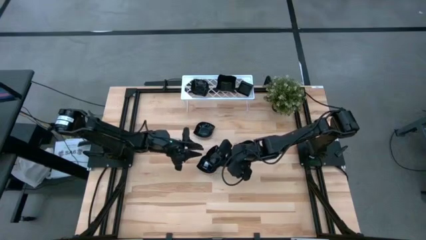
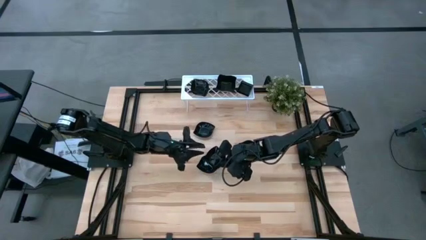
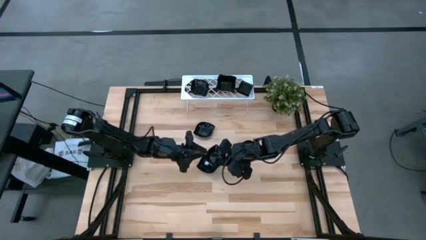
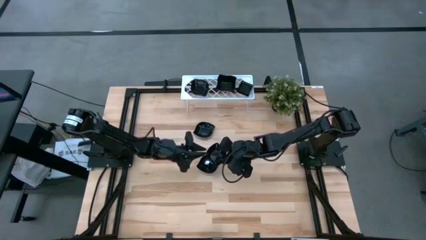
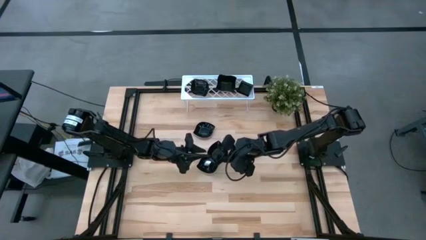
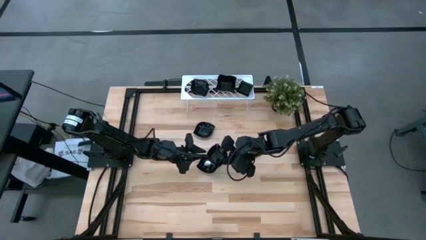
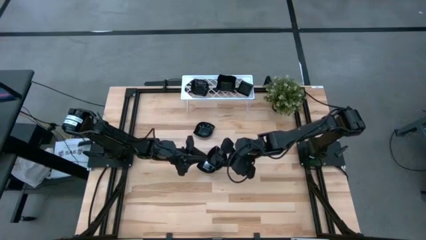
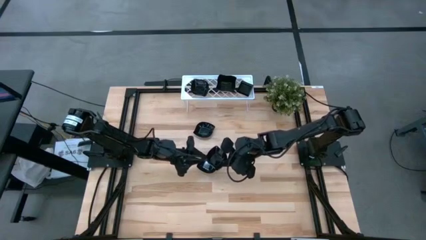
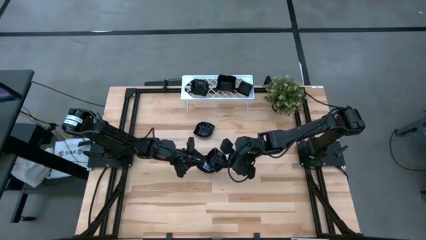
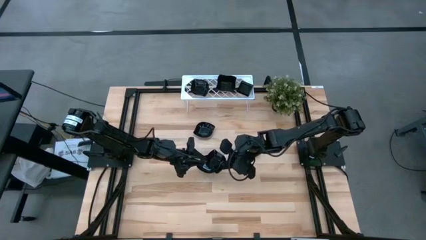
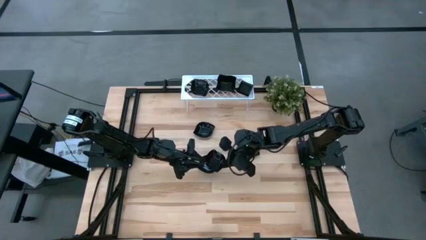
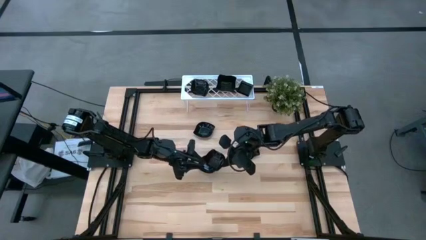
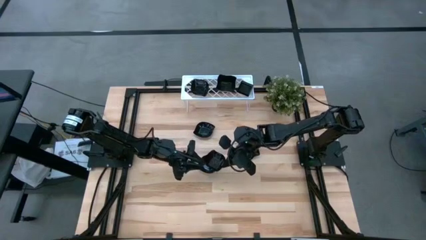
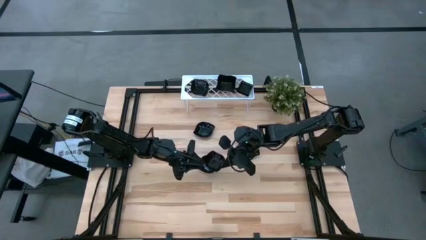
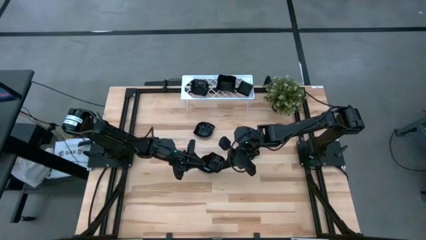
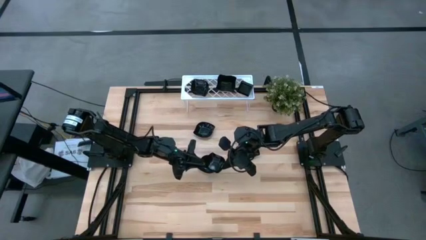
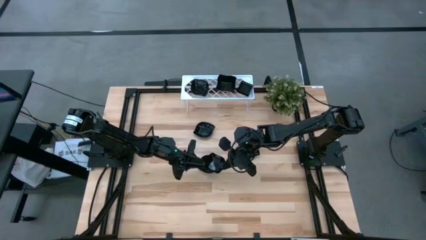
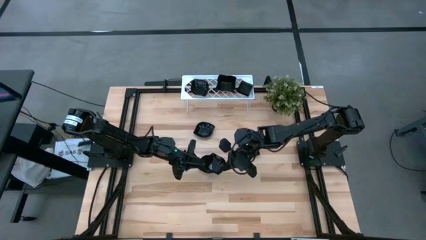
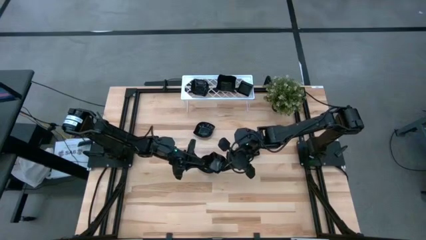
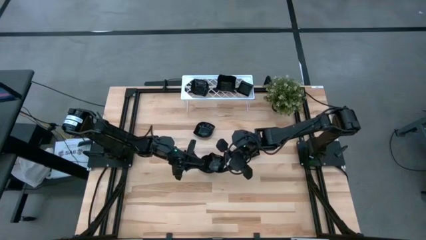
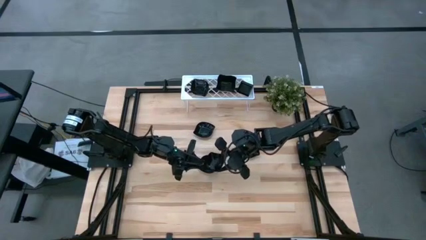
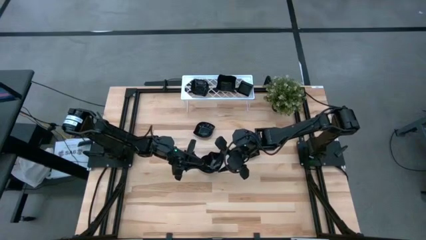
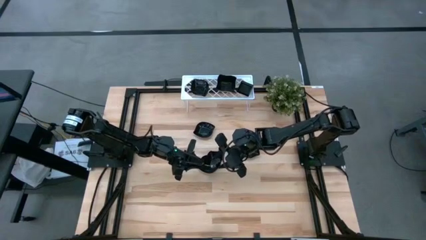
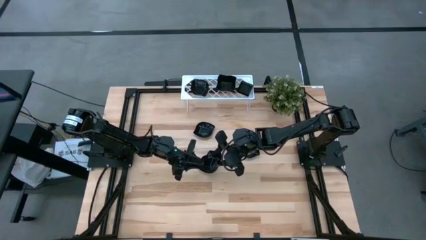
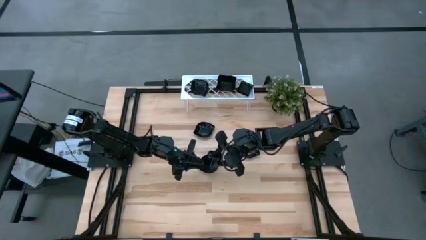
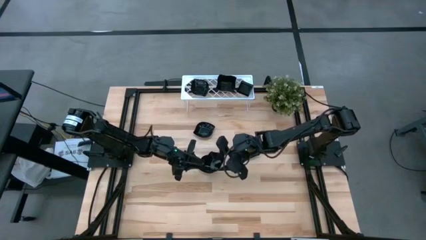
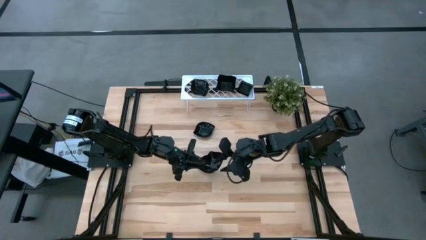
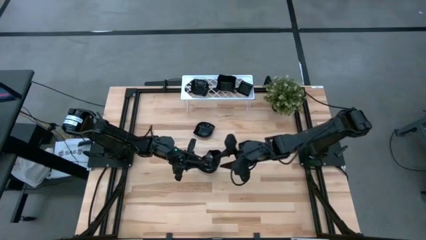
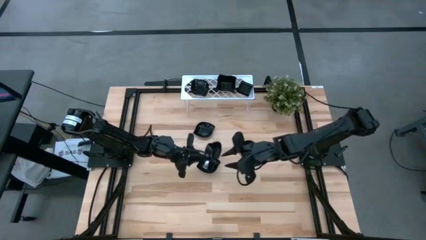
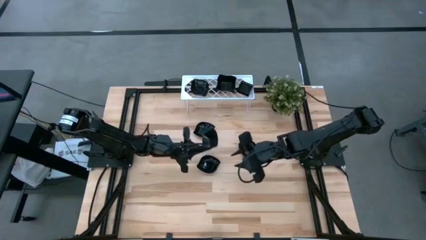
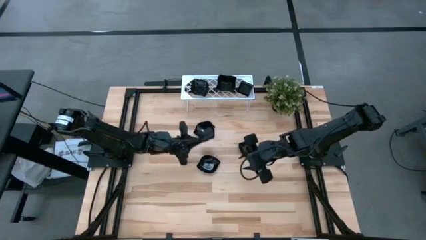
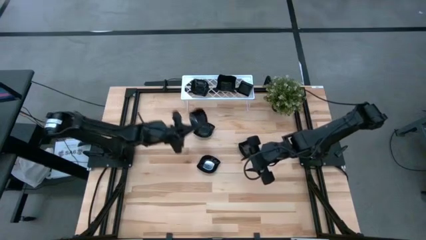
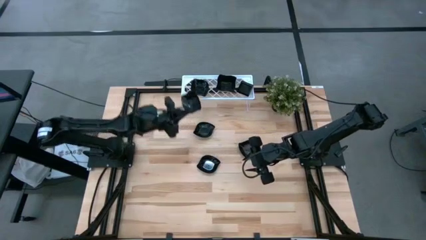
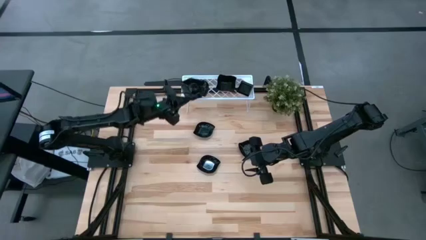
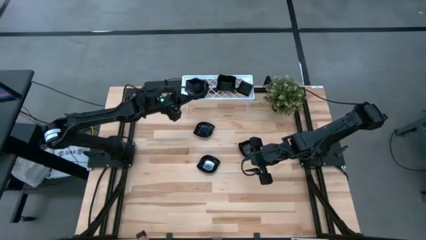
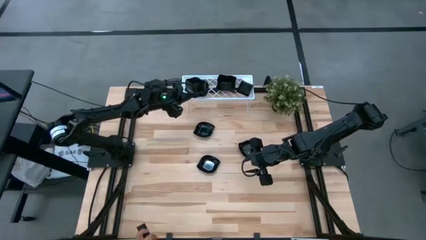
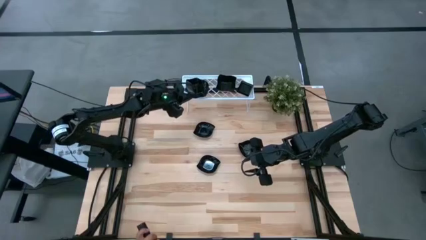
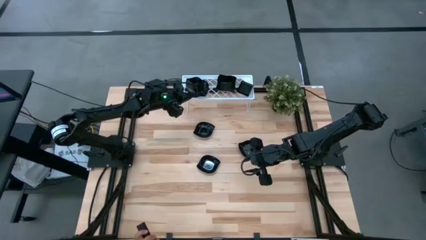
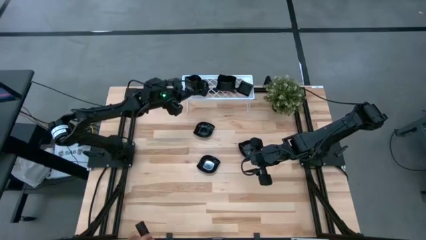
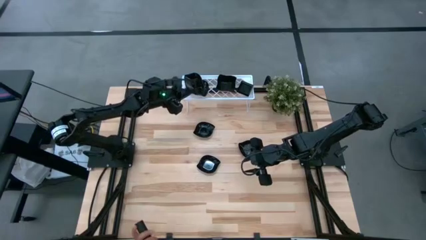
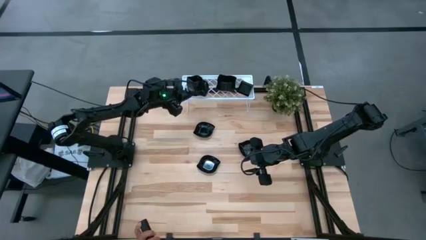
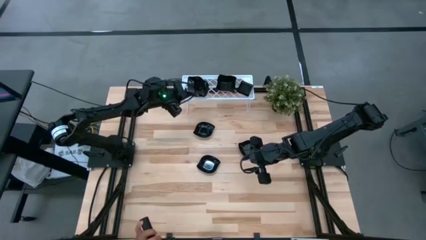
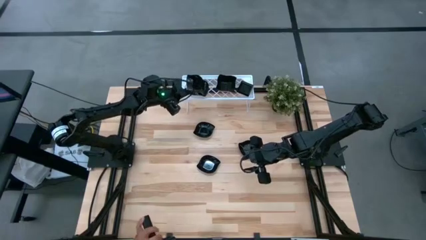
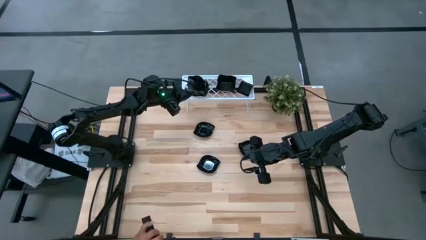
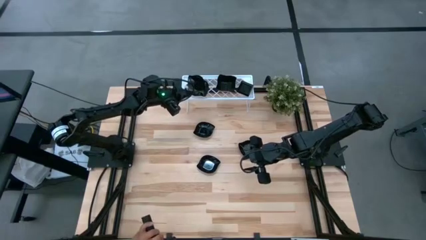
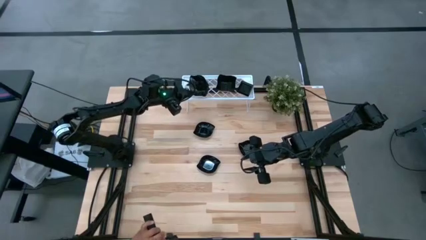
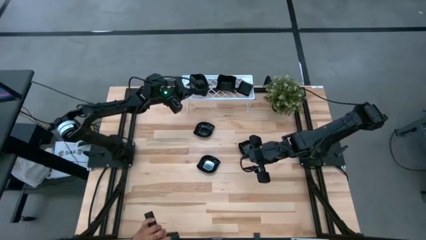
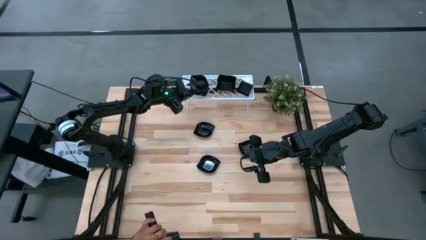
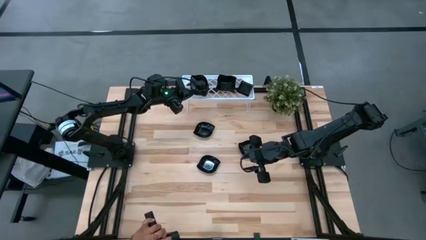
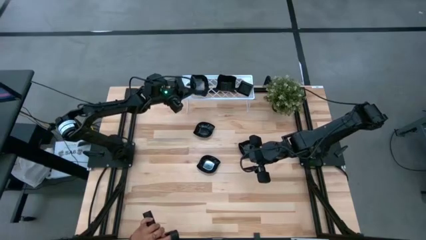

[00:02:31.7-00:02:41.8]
Task: Pick & Place Mini shaped plates
Stack the black leaf-shaped plate on top of the black leaf-shaped plate on the shelf

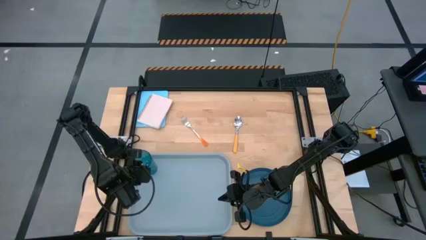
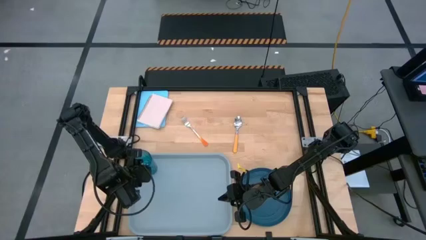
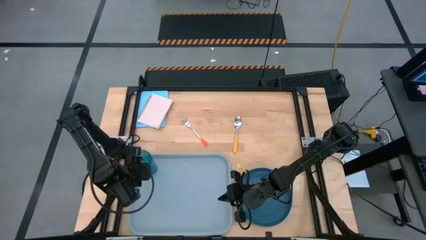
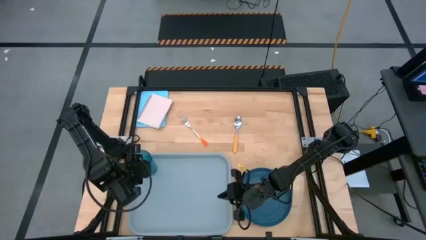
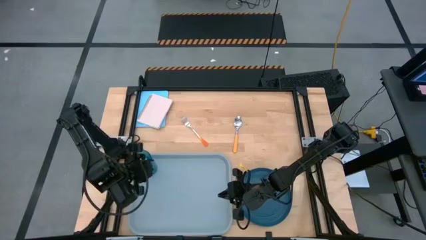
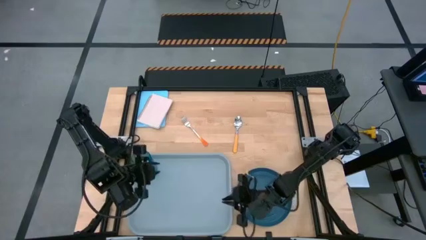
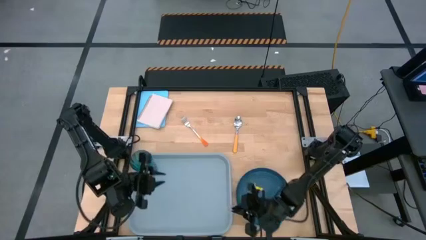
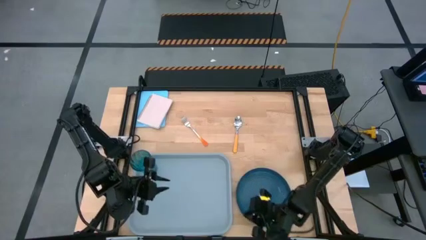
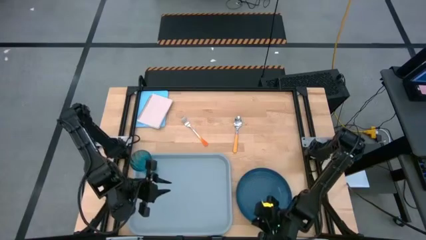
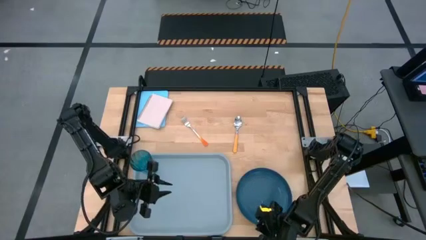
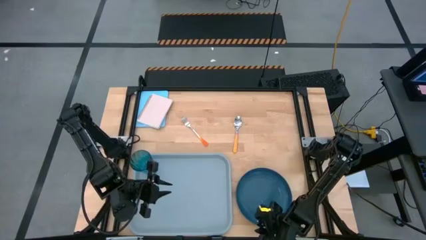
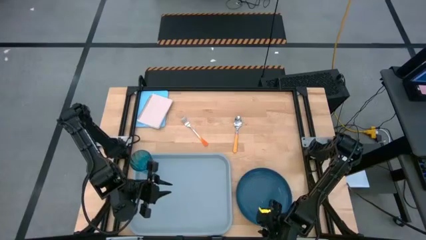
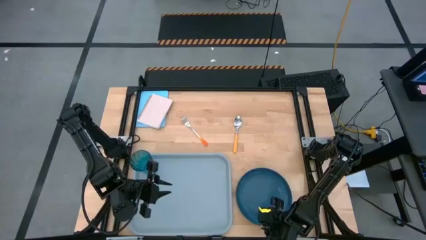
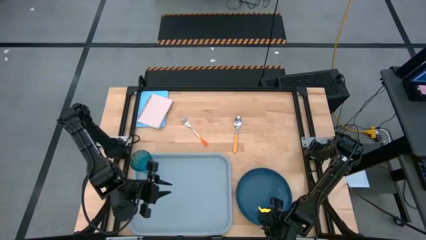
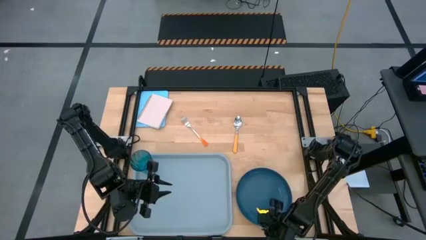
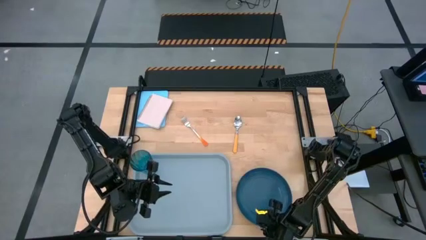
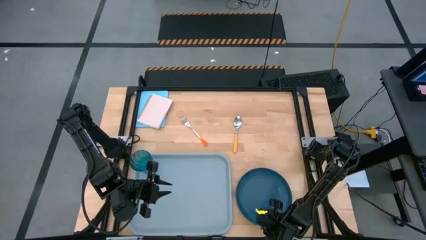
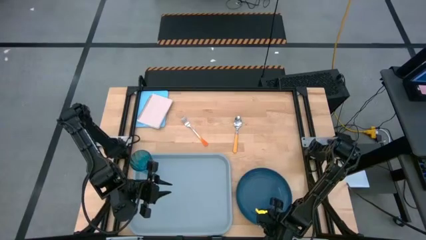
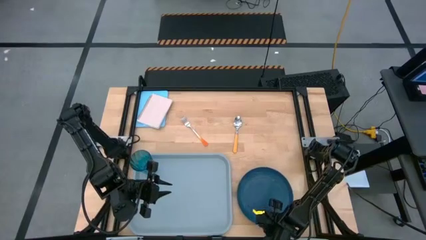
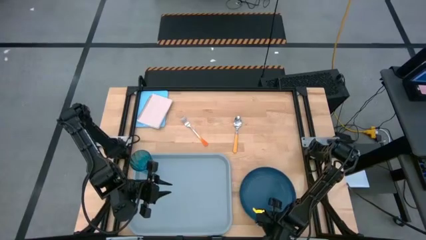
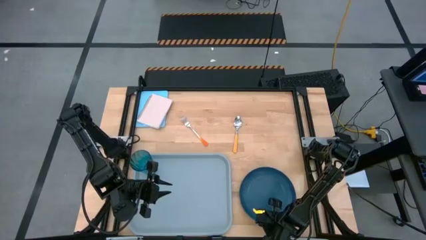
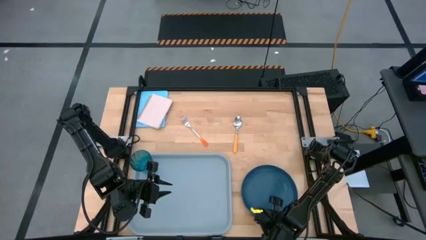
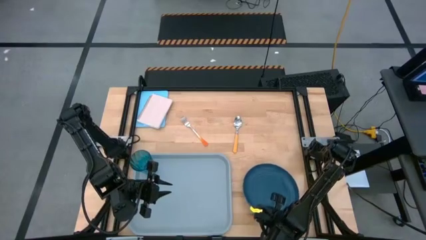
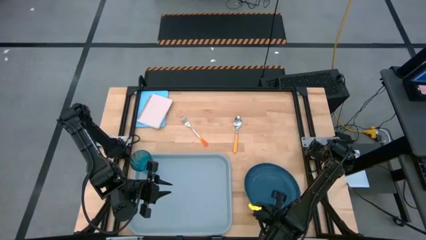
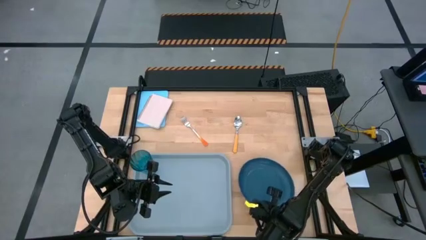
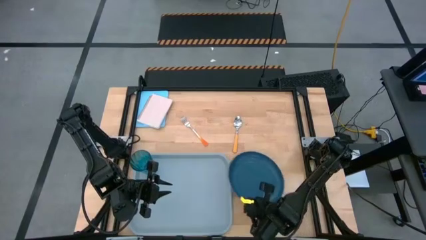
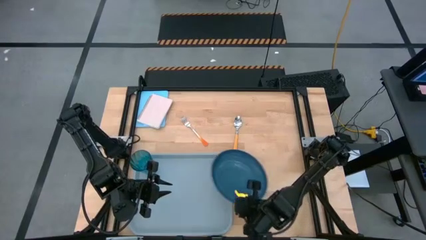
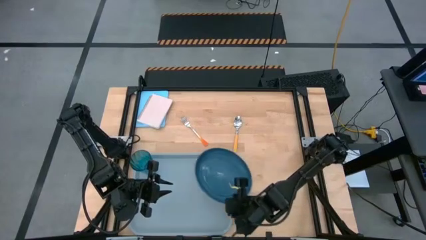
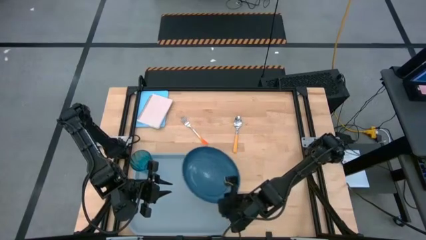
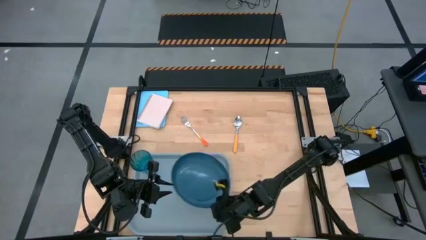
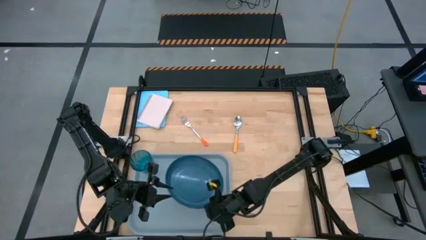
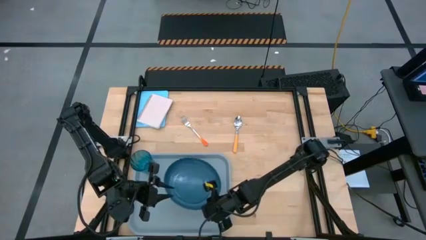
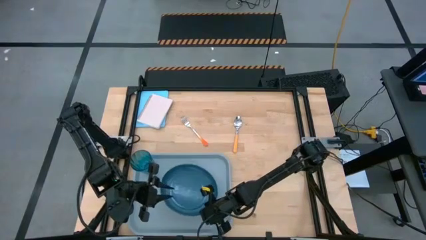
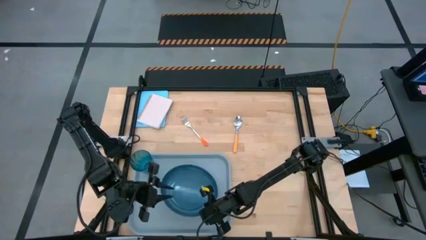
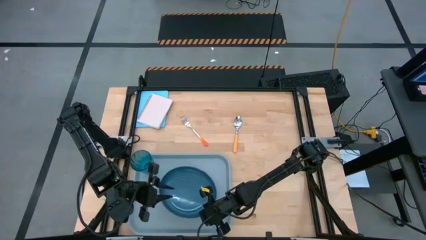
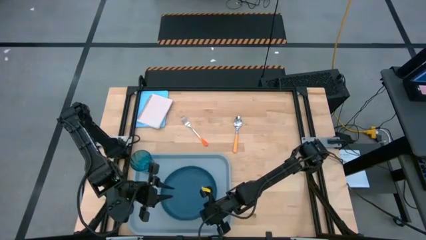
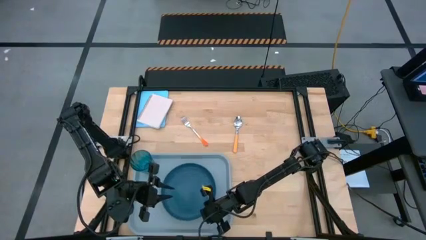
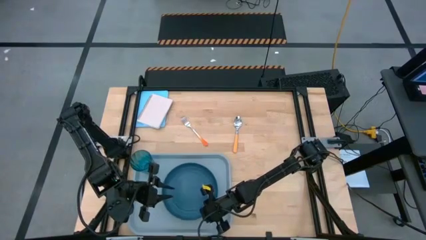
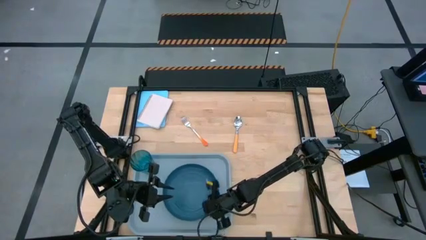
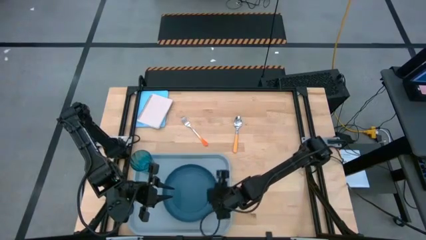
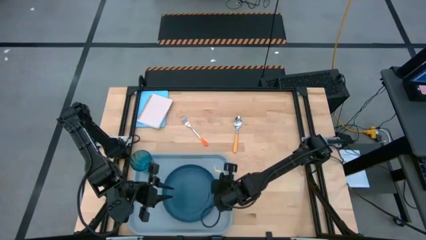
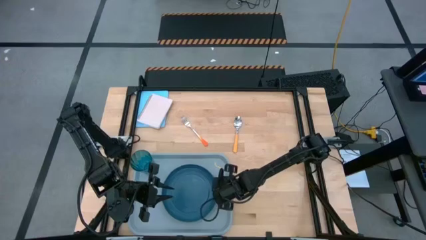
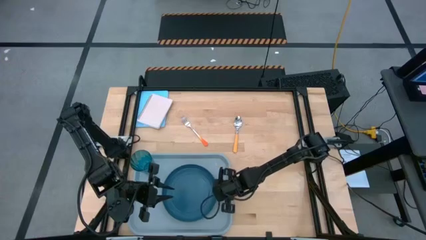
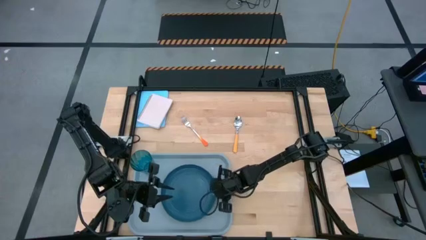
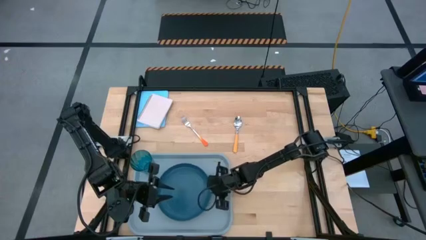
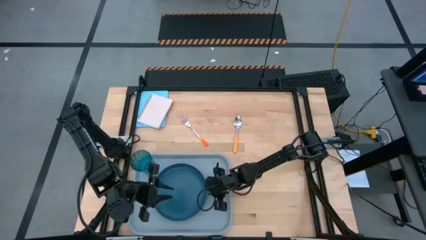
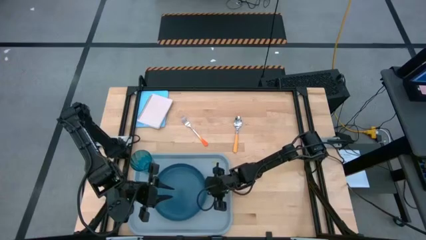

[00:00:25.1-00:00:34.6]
Task: Pick and place plate/cup/fork/spoon on tray
Put the dark blue plate on the gray tray to the bottom right of the blue cup
